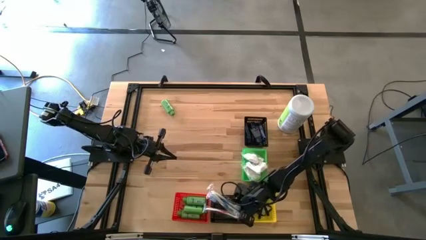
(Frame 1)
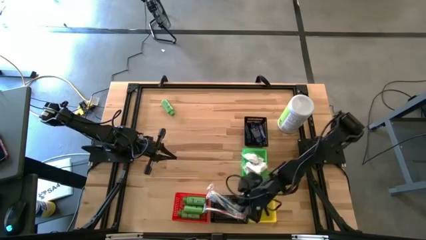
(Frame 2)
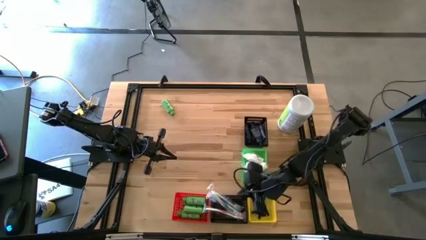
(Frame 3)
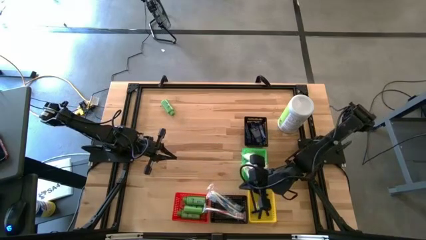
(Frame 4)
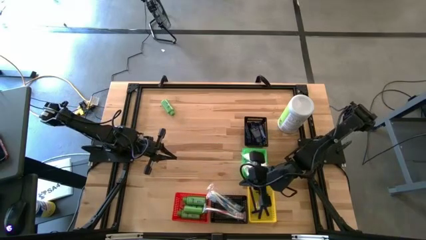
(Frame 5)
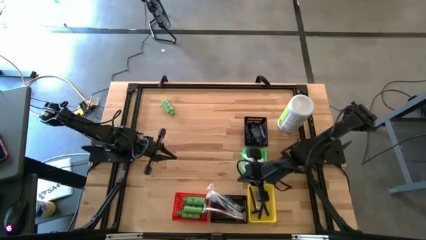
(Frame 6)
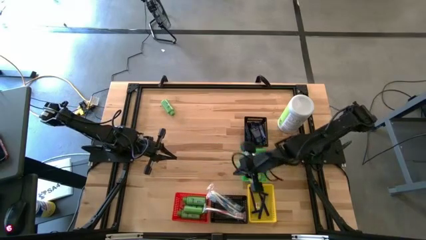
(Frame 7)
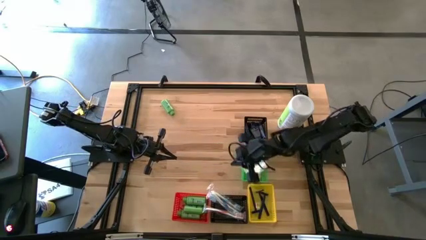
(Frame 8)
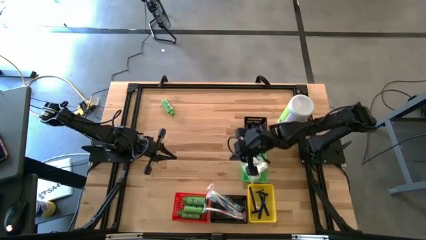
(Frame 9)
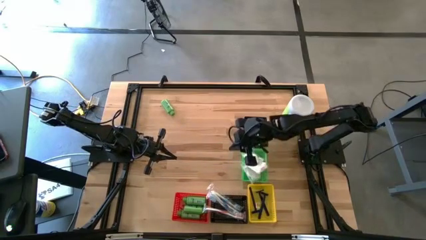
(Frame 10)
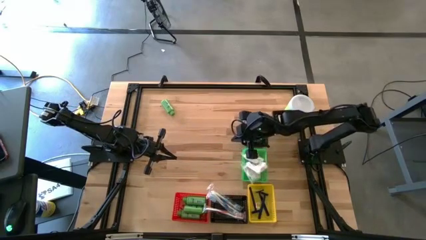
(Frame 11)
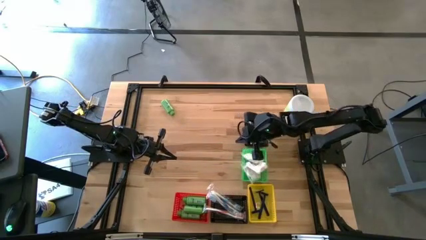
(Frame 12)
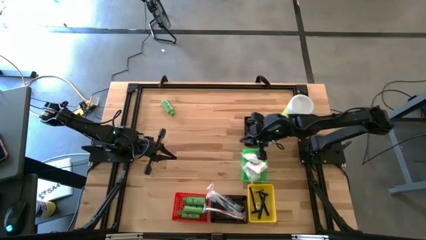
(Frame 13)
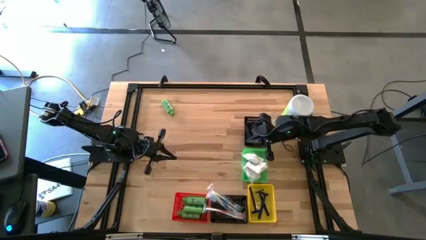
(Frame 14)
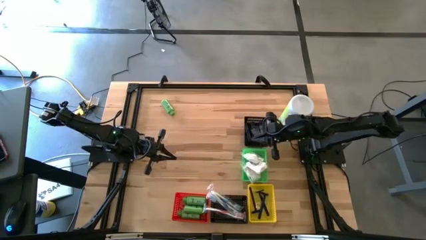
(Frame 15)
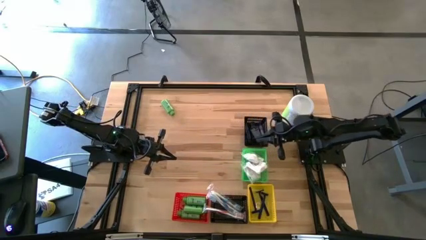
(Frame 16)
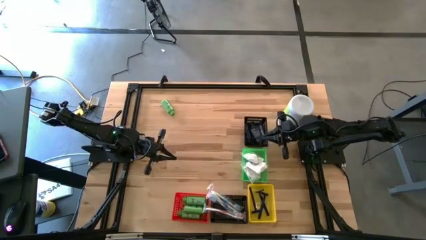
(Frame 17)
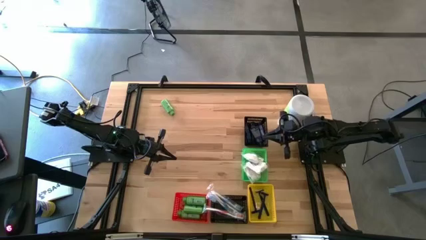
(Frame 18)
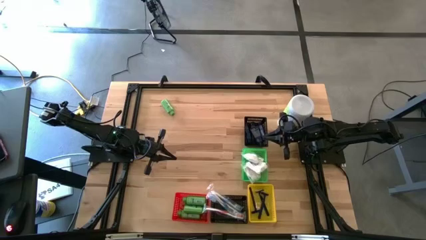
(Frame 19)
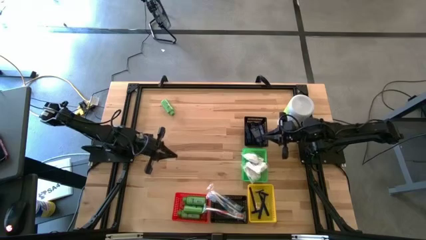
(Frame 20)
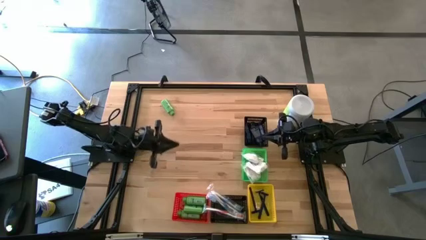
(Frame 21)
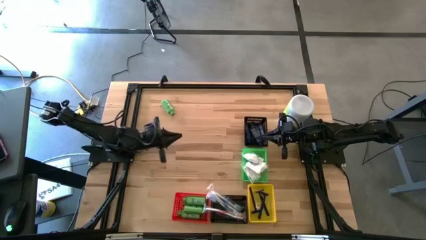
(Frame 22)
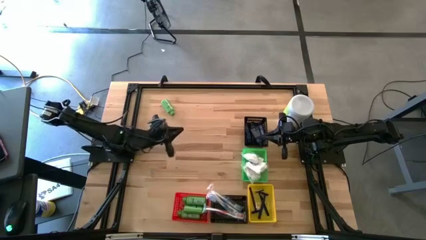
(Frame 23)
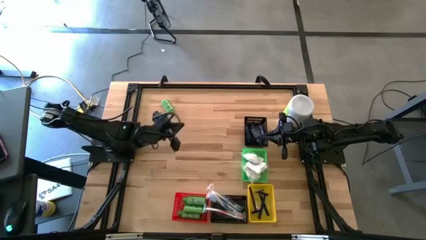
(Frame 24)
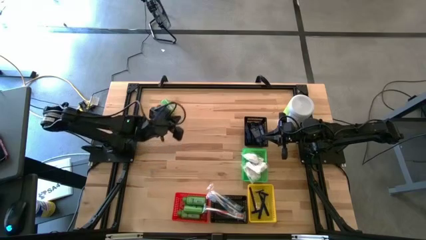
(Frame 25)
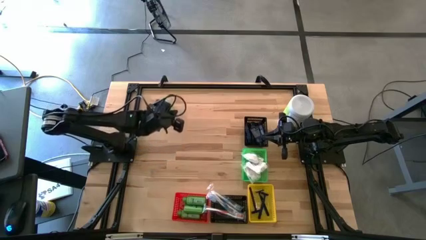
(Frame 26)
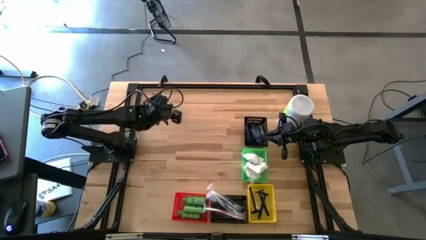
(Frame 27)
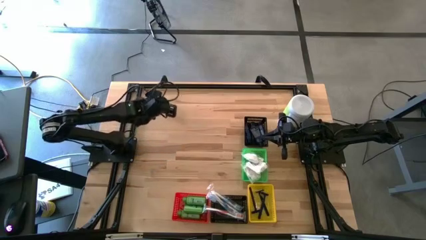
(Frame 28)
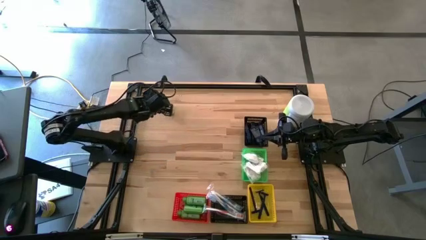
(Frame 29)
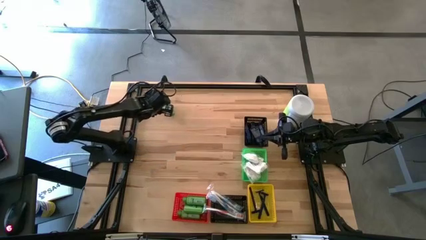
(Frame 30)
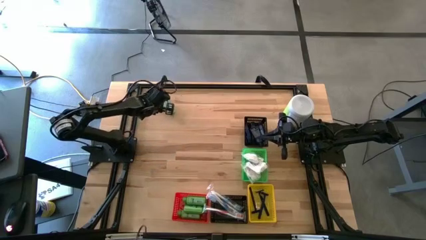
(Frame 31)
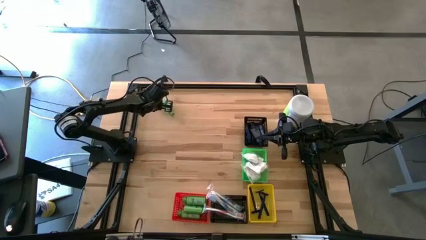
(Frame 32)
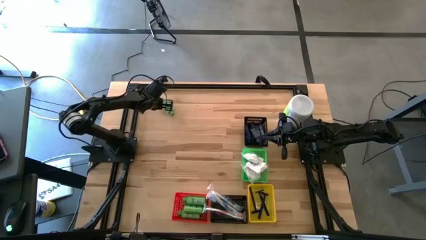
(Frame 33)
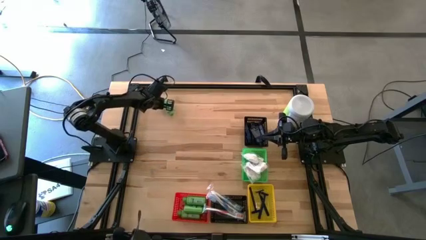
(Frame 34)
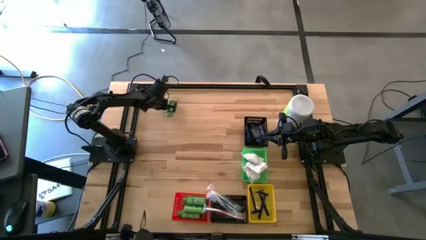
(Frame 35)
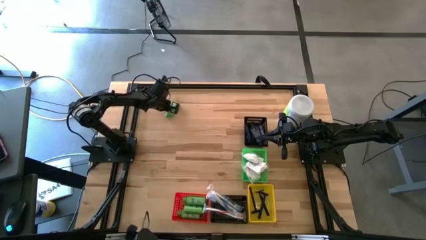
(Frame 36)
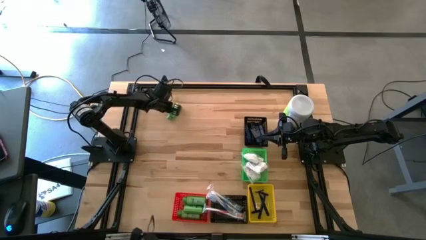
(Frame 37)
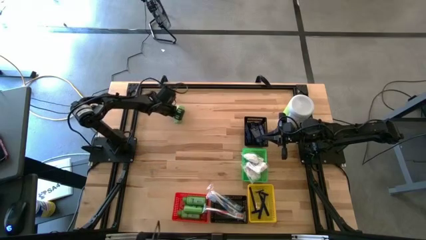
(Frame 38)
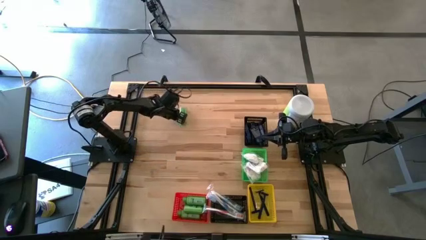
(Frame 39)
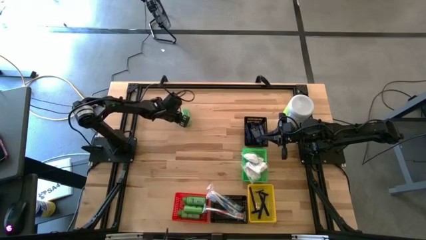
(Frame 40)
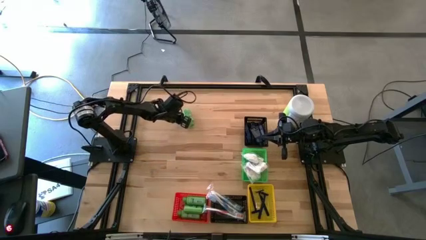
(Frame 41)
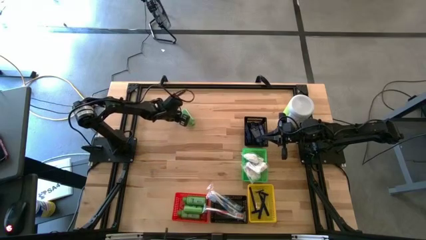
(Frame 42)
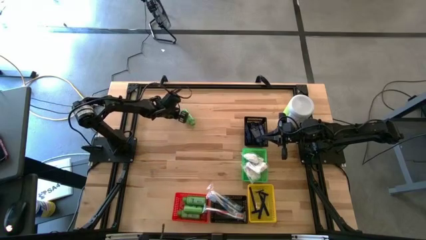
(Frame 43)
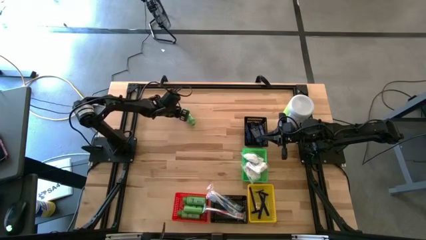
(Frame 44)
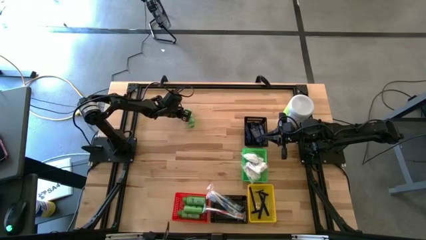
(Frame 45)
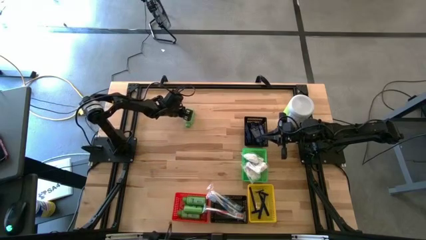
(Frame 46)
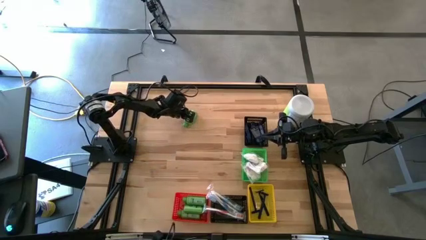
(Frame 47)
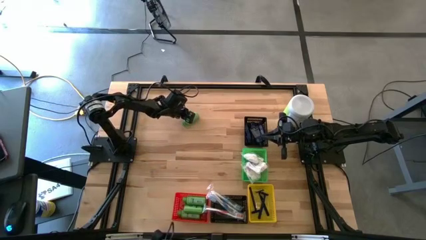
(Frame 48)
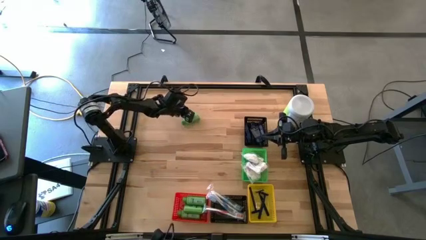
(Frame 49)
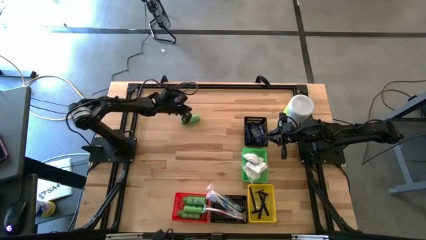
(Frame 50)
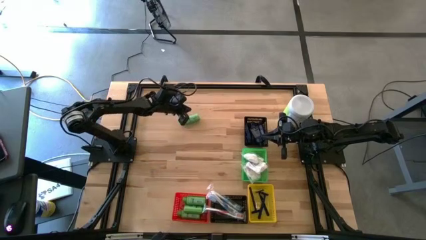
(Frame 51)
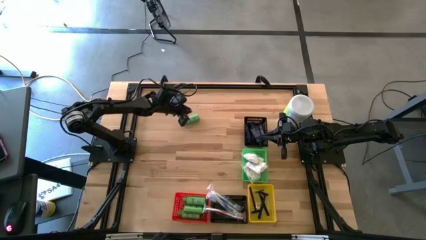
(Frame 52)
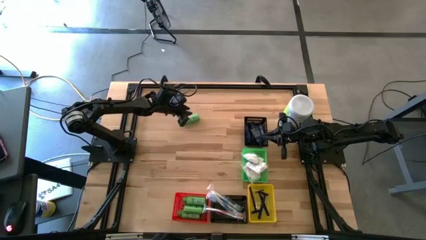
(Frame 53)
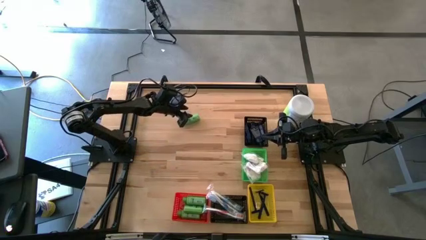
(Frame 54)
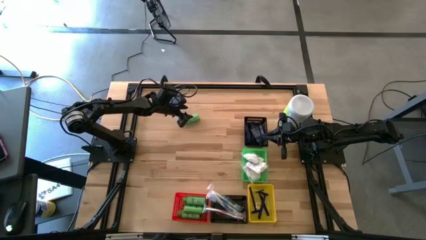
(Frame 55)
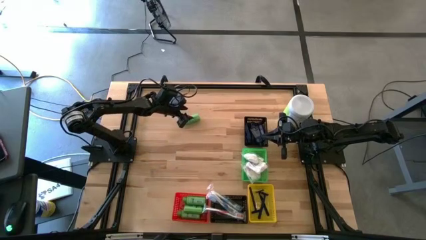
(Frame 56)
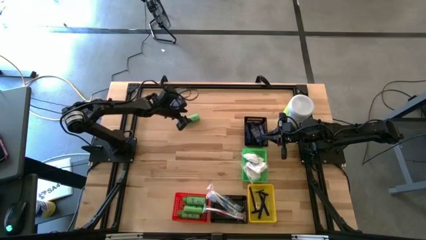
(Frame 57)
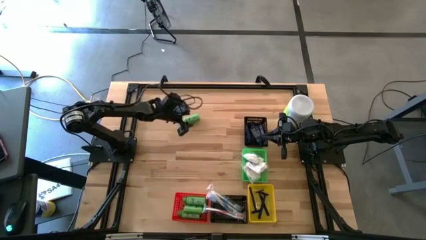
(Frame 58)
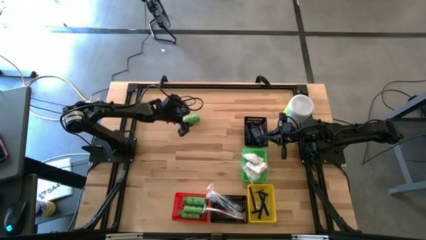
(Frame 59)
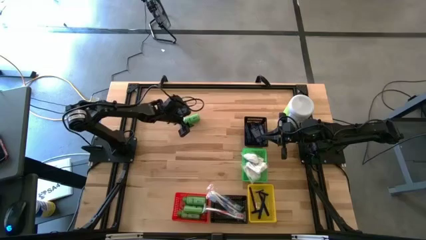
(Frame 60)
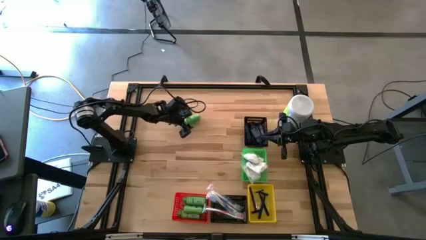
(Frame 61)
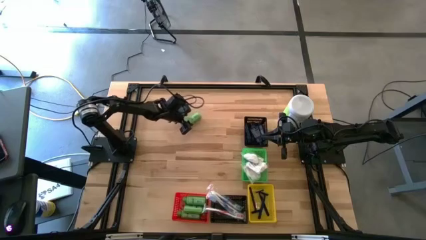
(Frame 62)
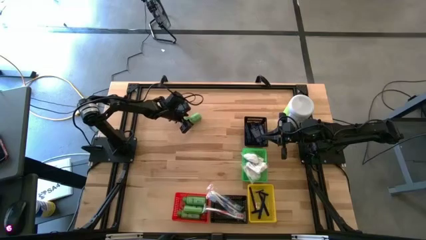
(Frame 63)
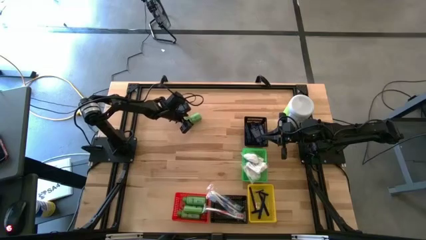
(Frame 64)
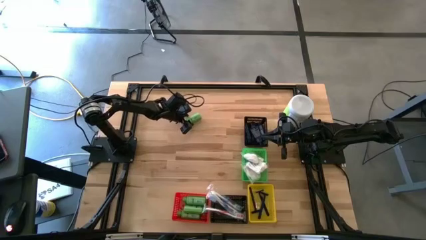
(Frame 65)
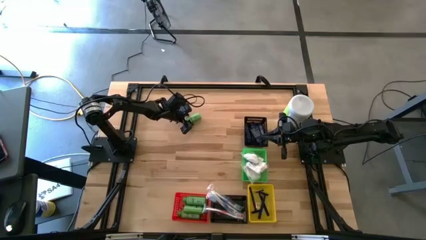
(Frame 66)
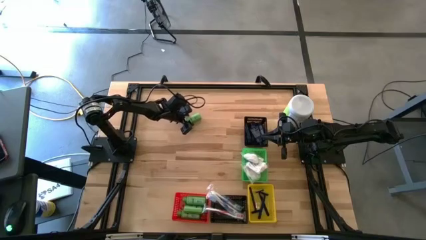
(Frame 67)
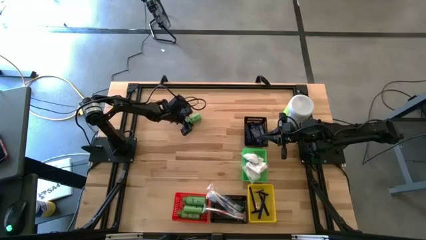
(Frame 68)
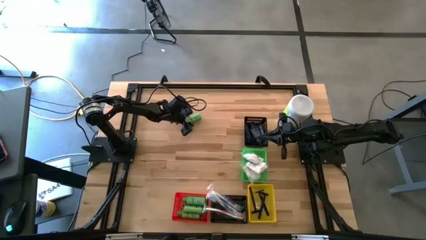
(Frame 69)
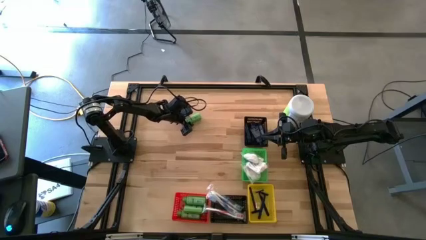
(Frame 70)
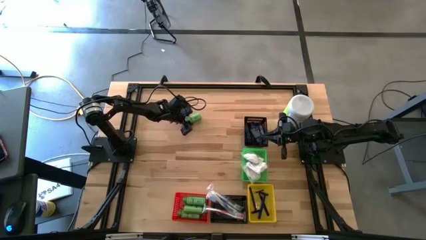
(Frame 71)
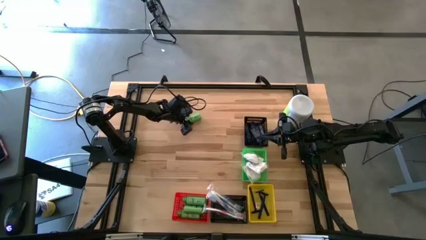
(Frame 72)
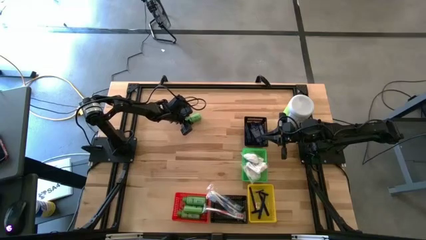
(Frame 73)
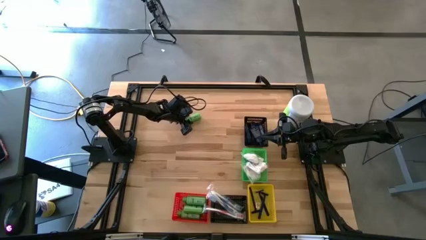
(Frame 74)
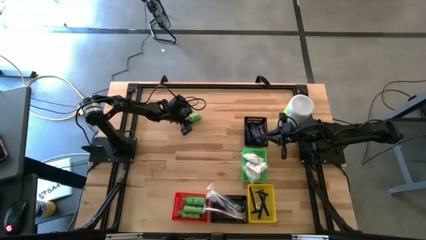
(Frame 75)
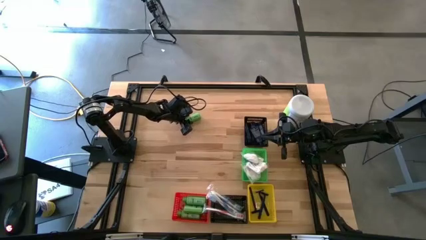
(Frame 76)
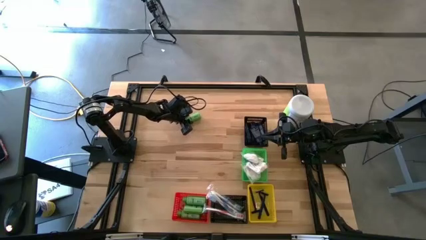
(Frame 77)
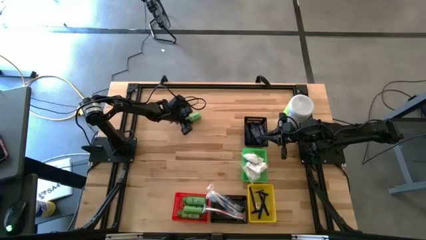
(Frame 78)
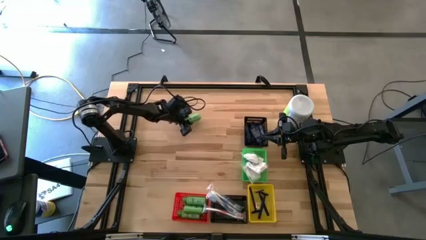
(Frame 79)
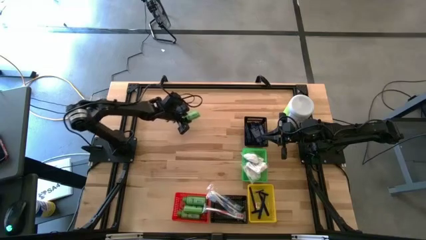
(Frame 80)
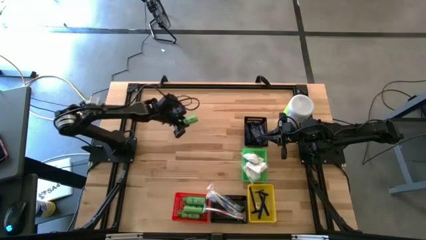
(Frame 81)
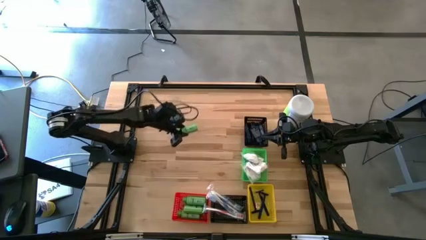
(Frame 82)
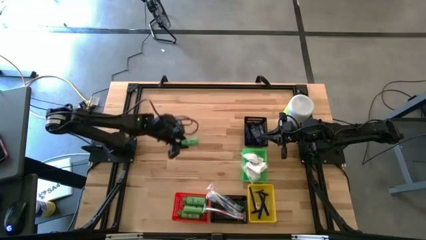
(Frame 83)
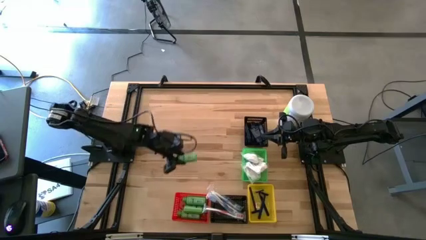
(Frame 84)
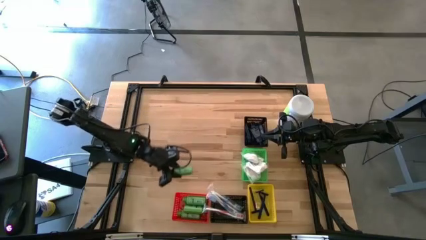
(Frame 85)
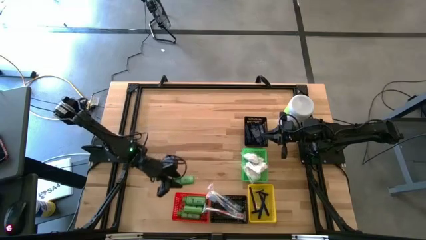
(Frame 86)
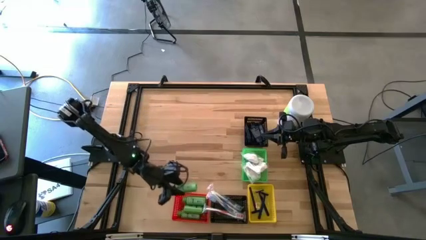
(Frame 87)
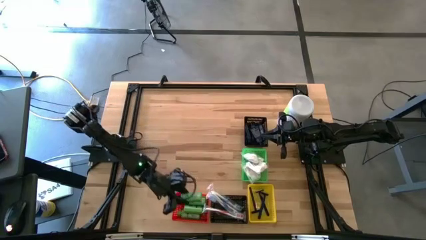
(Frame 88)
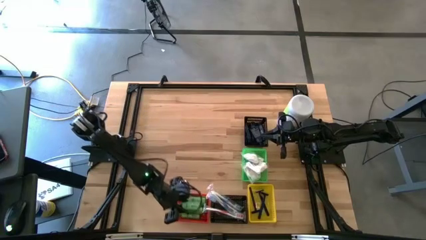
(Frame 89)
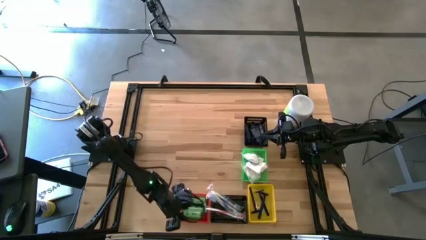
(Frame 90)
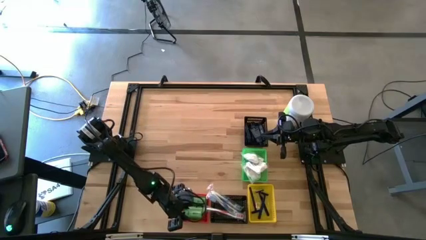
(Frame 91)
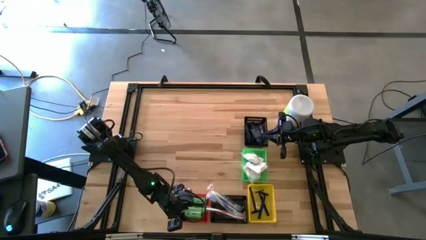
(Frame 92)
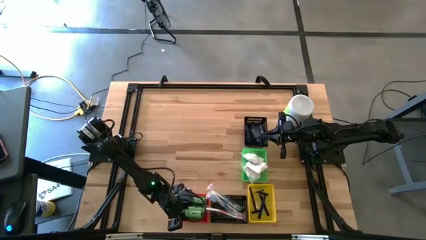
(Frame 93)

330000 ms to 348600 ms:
Task: Pick & Place Travel size toiletries
Put the green shampoo bottle into the red bin
